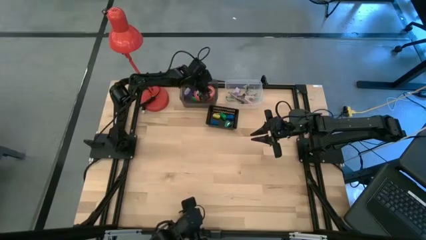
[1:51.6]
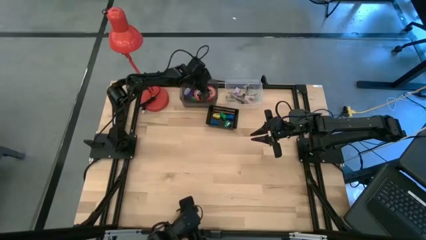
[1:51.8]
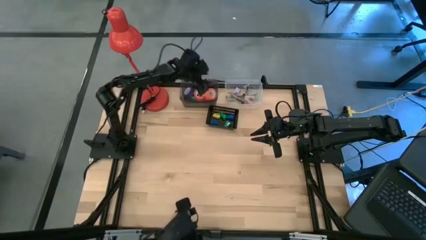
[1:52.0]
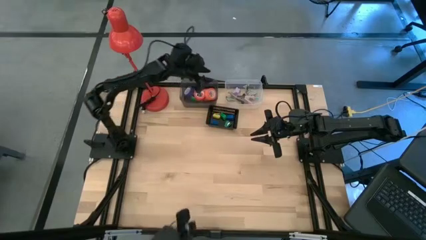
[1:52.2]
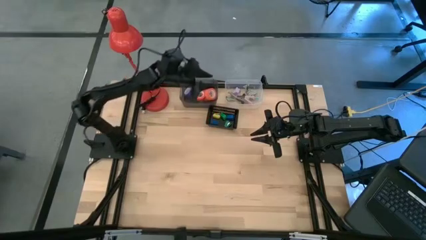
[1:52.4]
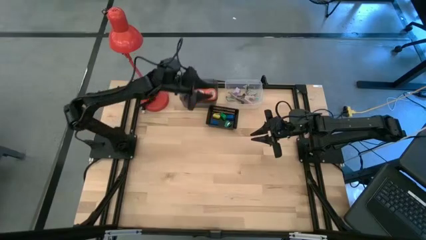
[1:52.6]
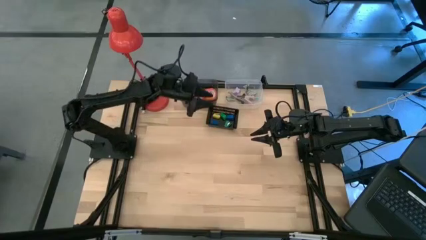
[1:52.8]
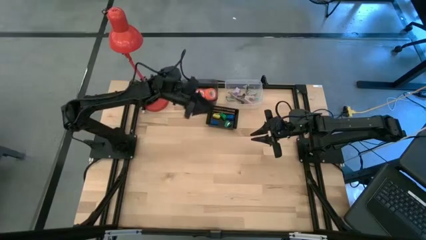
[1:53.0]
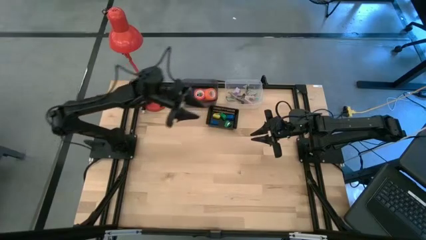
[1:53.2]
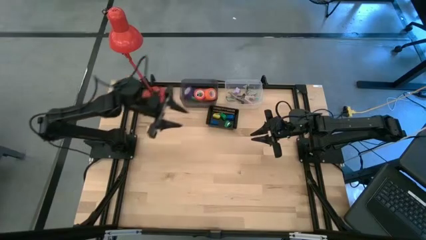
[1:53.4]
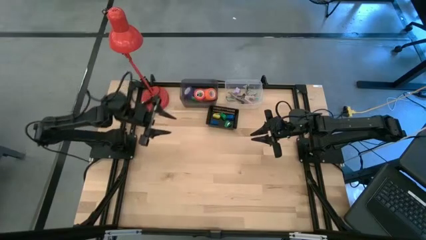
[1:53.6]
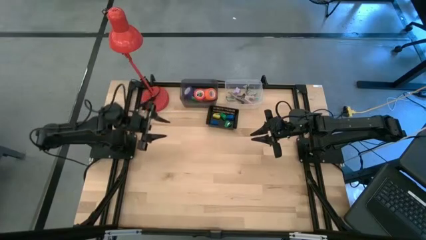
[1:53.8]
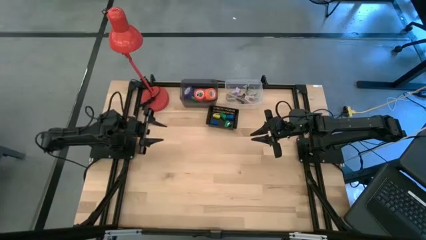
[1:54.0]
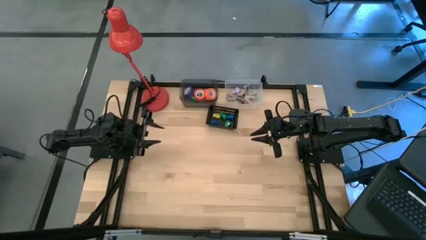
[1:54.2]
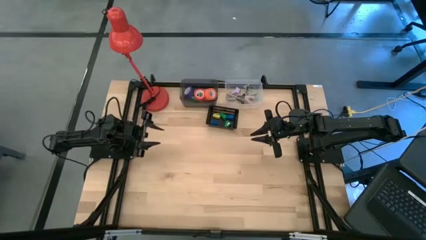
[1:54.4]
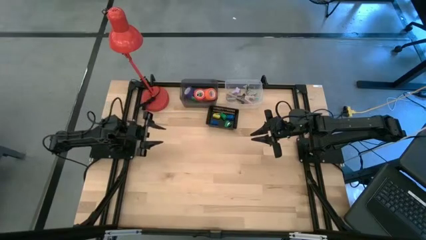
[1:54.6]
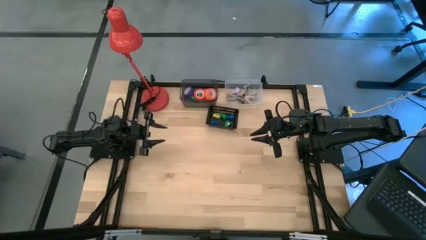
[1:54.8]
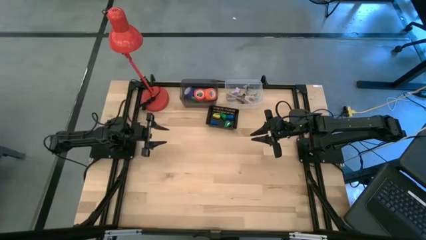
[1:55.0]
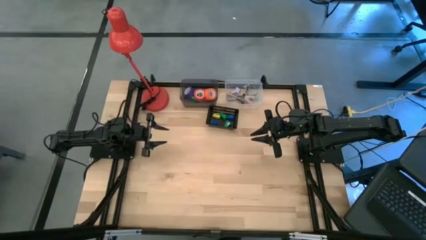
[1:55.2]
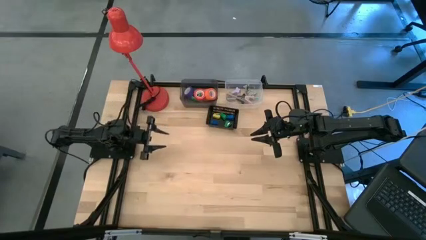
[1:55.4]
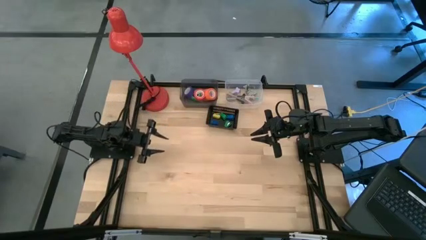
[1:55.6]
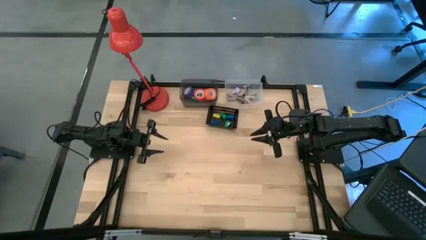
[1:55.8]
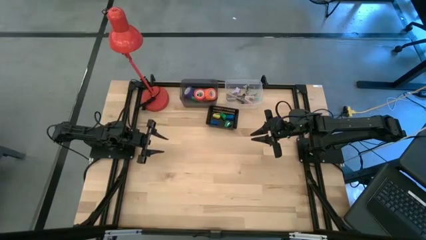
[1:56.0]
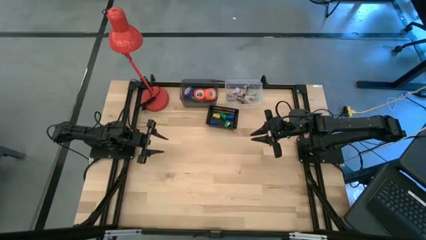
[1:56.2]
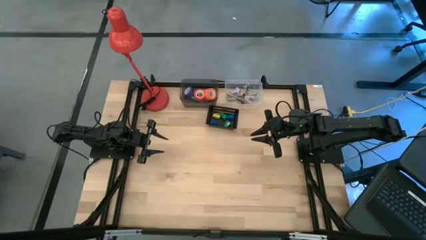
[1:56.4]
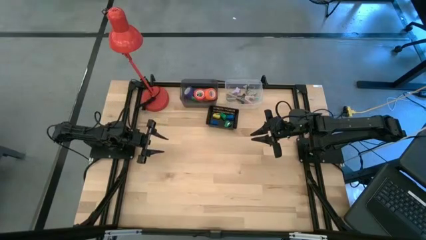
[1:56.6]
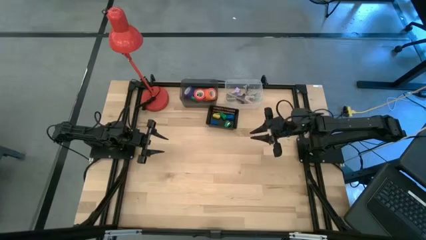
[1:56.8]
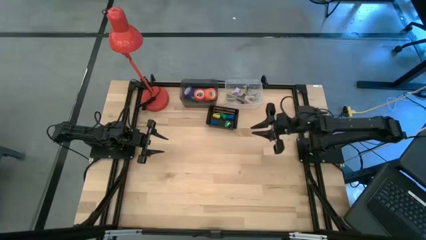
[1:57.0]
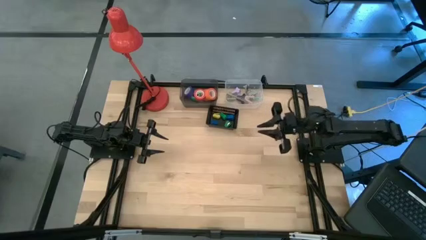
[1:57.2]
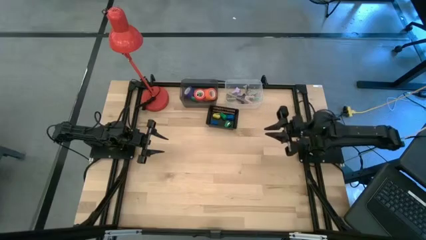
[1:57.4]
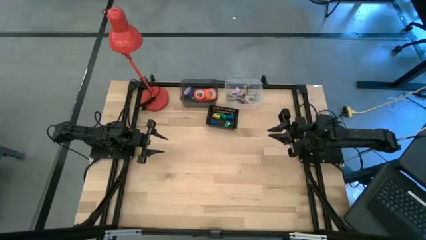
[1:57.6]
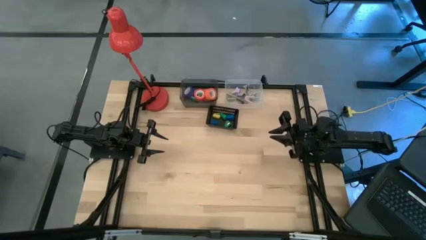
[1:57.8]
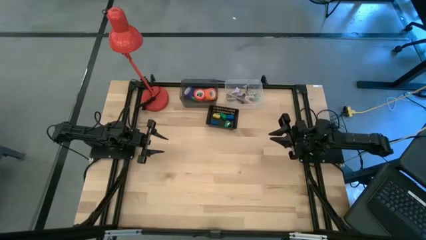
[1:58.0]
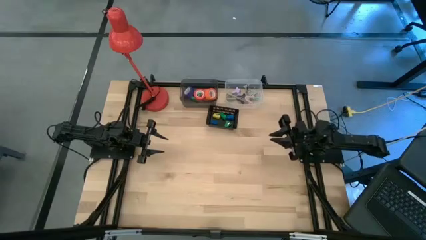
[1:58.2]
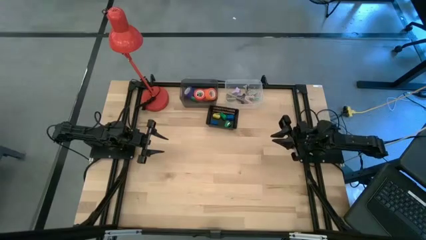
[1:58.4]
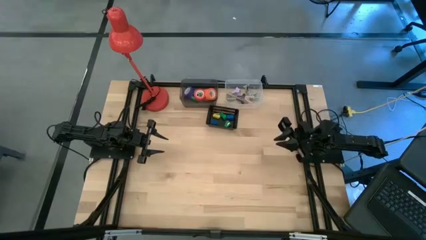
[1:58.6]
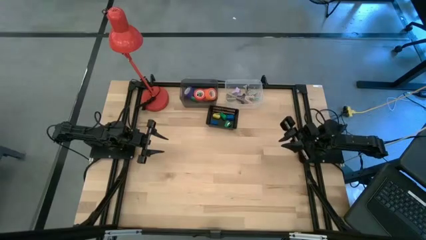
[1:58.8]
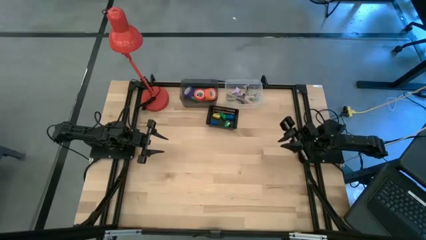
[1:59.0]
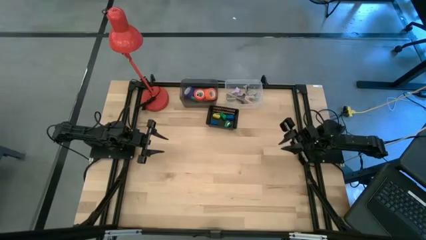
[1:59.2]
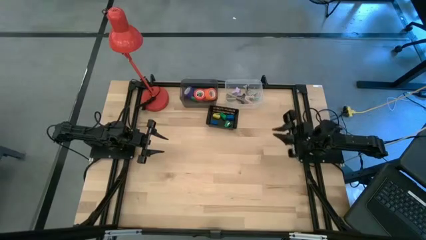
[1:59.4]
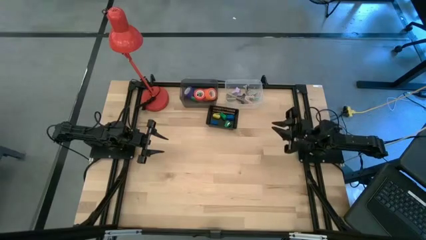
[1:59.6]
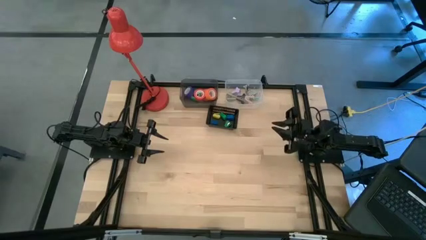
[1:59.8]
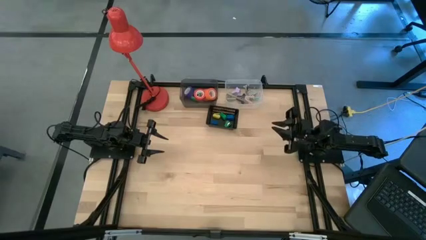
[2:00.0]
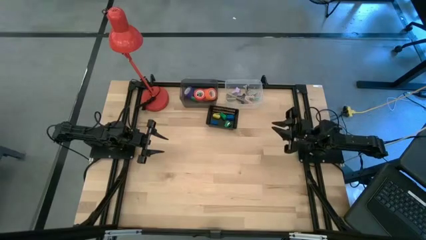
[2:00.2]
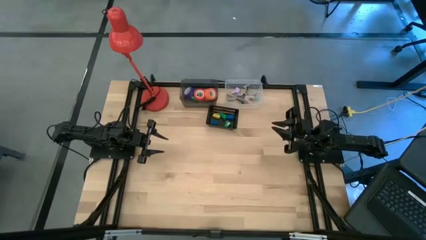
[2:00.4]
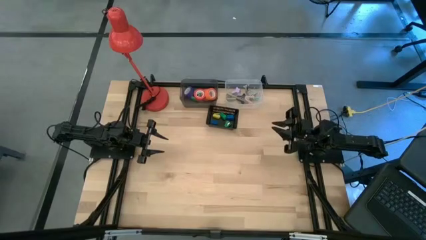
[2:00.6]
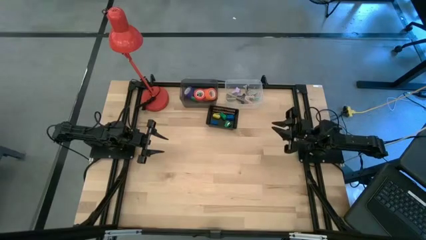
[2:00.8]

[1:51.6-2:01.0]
Task: Pick and place Stapler, Stapler remover, tape
Return to Home Position

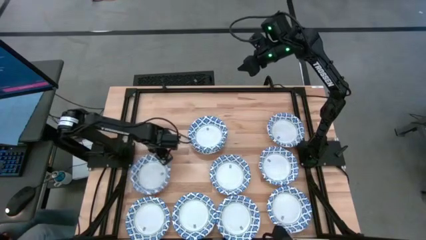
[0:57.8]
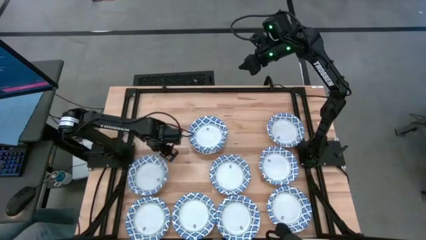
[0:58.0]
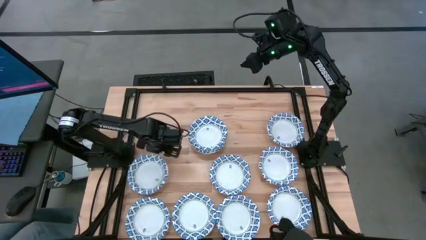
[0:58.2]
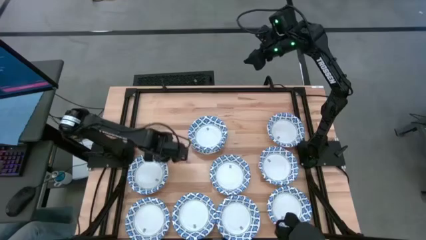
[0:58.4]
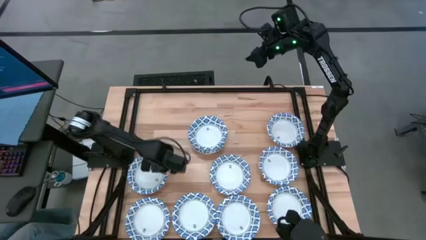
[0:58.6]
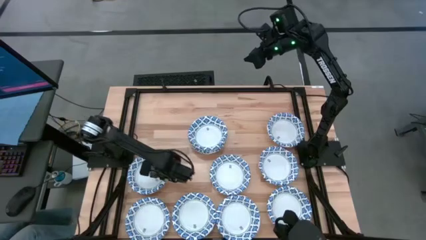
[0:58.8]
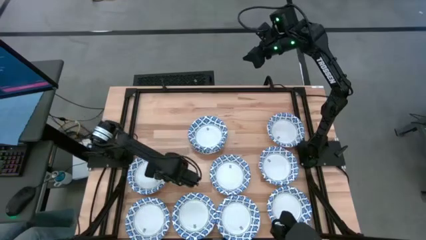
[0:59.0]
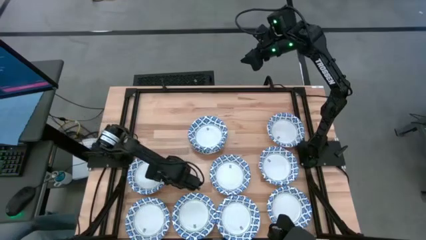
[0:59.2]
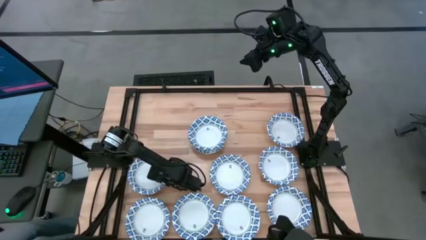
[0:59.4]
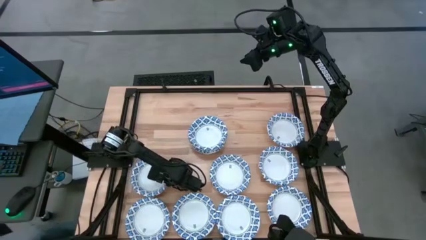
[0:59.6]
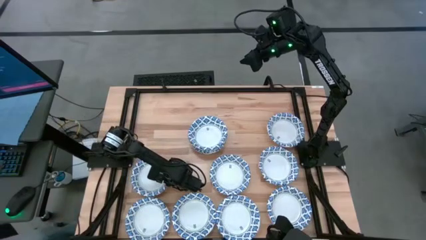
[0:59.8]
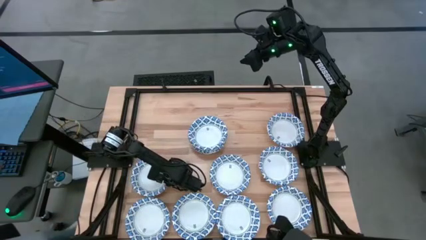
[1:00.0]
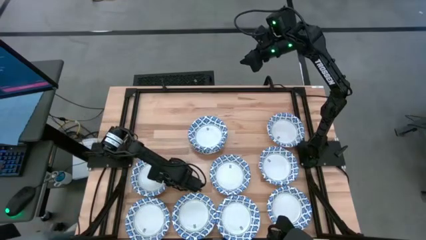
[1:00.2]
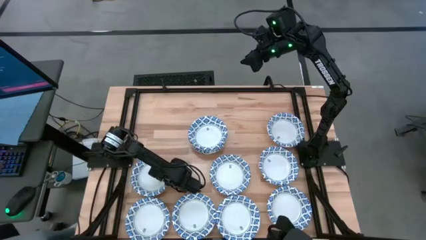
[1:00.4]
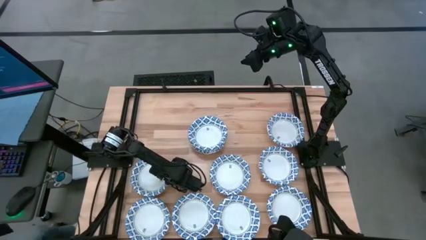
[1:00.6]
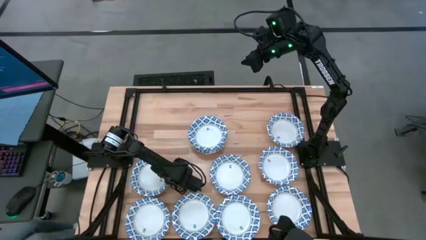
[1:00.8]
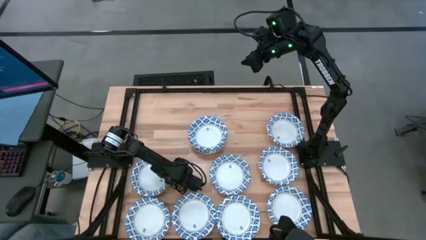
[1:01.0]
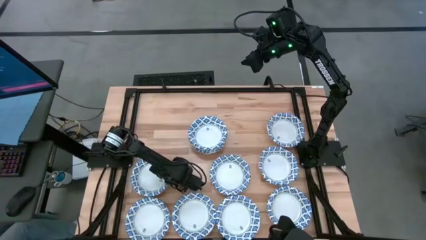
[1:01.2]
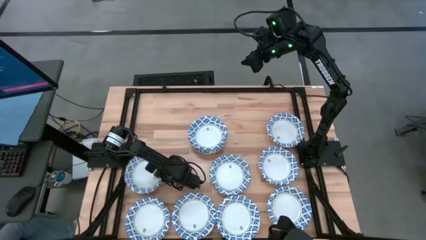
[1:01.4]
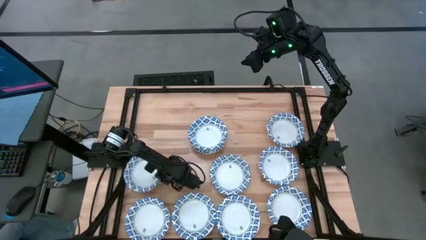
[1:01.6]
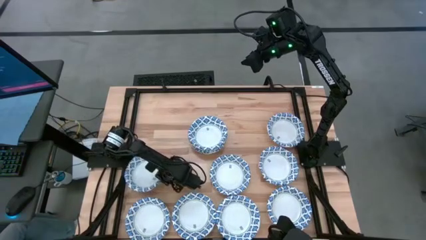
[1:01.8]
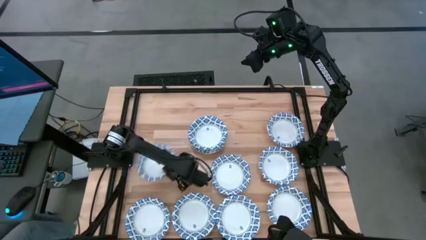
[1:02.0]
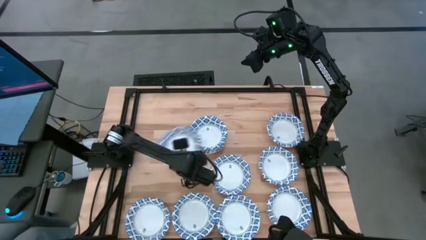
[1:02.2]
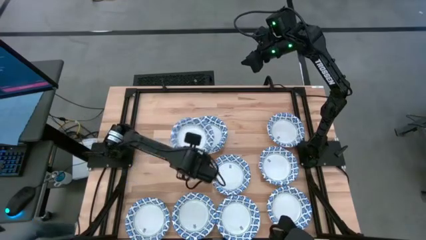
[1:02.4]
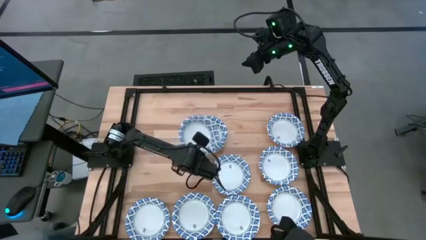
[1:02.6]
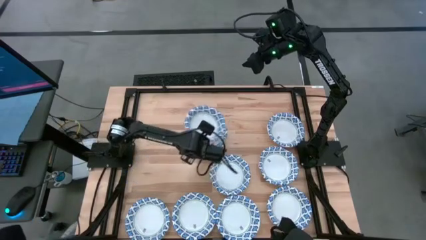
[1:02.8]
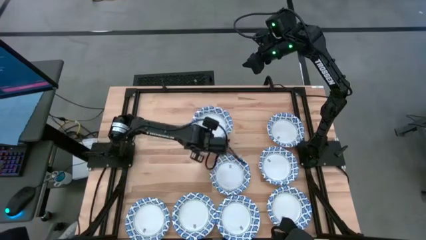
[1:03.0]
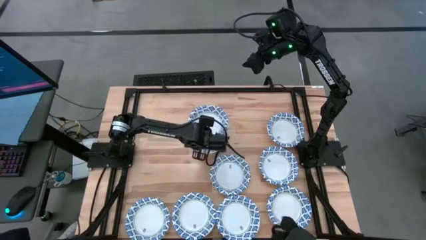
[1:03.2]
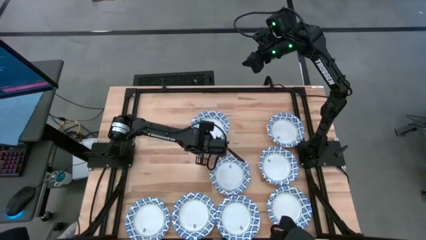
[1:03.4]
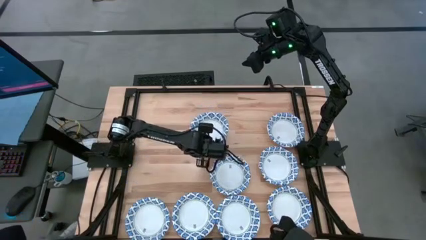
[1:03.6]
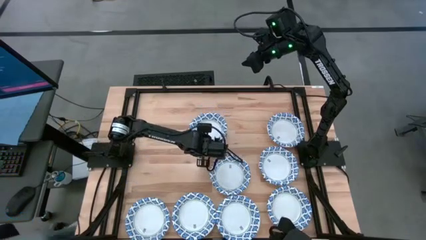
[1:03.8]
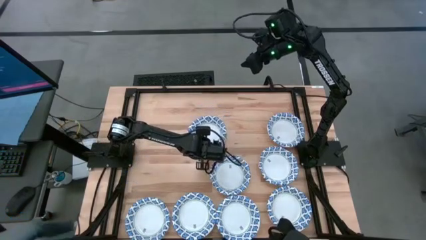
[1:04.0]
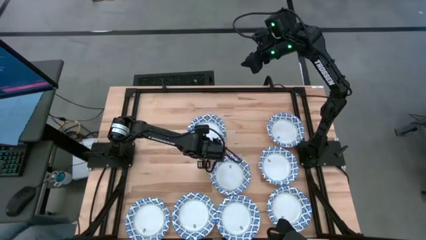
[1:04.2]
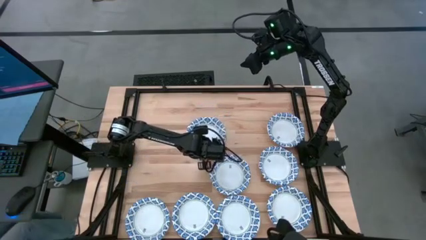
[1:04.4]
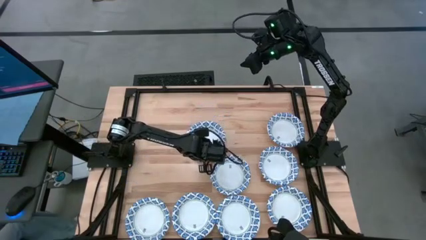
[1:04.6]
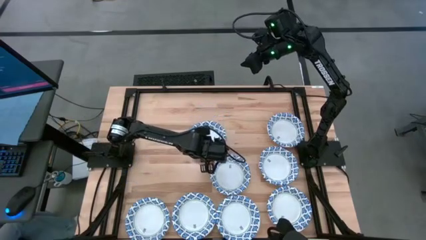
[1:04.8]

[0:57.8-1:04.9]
Task: Nest bowls inside each other
Stack the blue bowl on top of the blue bowls

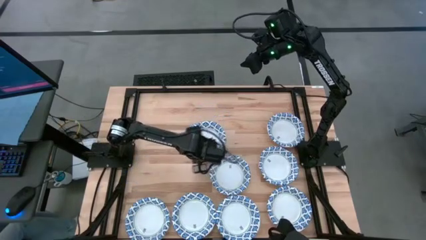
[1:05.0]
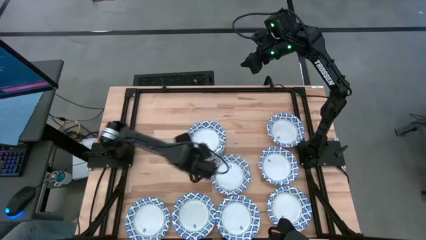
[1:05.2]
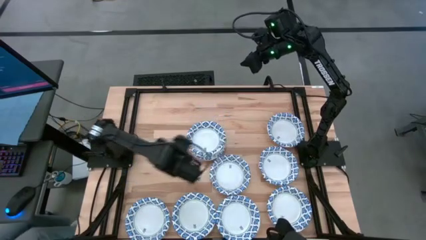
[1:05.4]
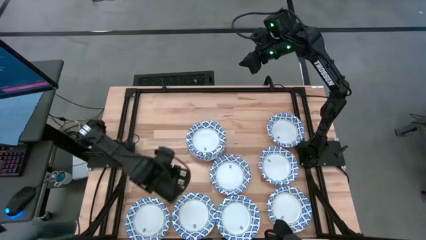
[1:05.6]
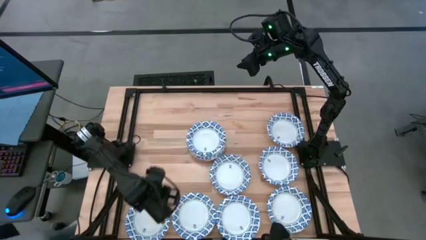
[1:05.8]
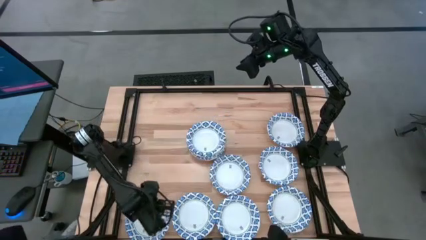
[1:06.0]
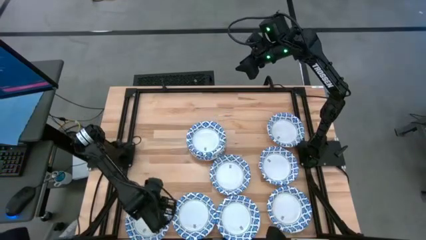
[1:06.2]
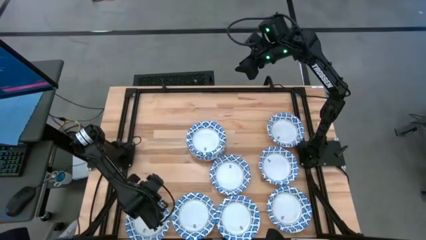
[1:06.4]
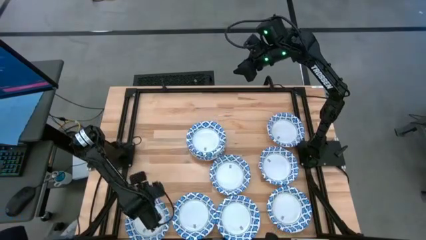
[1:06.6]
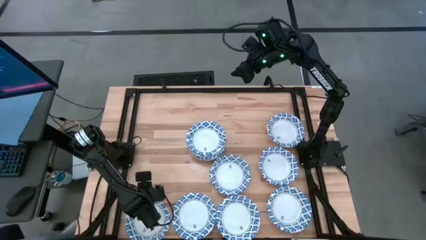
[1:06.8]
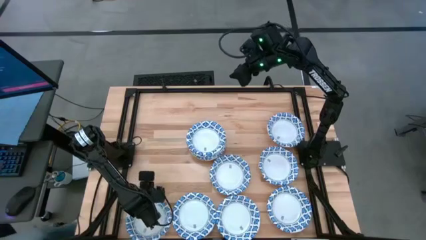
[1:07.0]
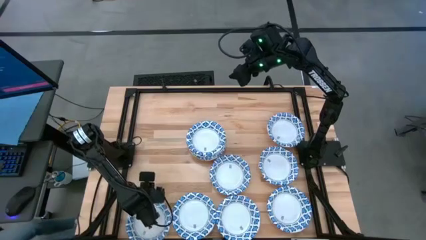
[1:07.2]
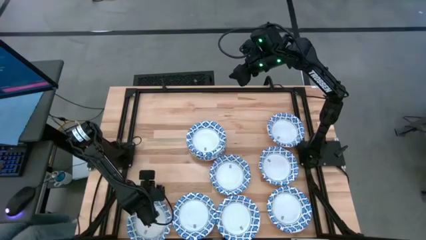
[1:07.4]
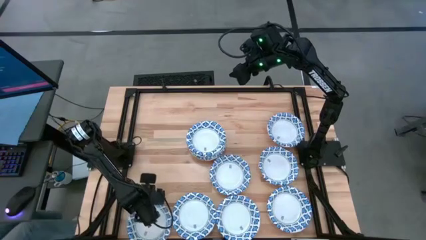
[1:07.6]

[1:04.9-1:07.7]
Stack the blue bowl on top of the blue bowls
